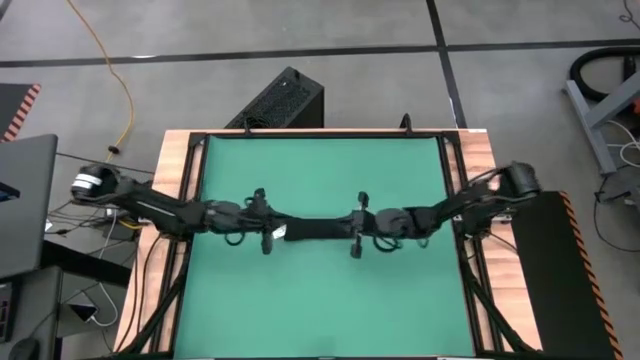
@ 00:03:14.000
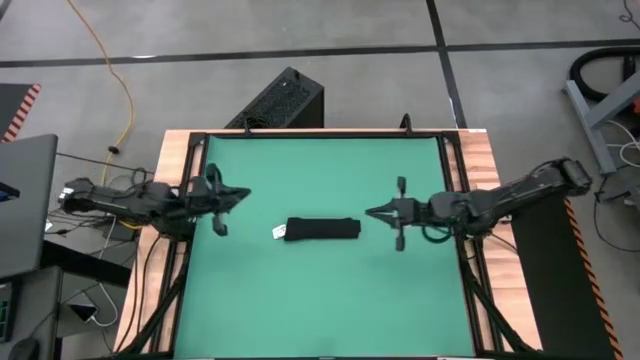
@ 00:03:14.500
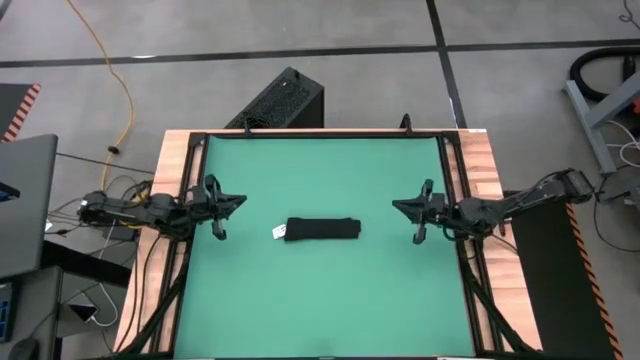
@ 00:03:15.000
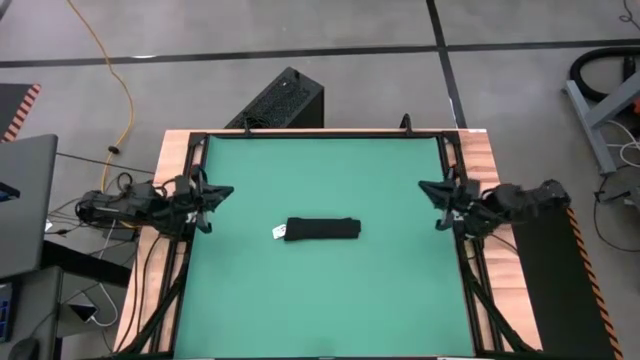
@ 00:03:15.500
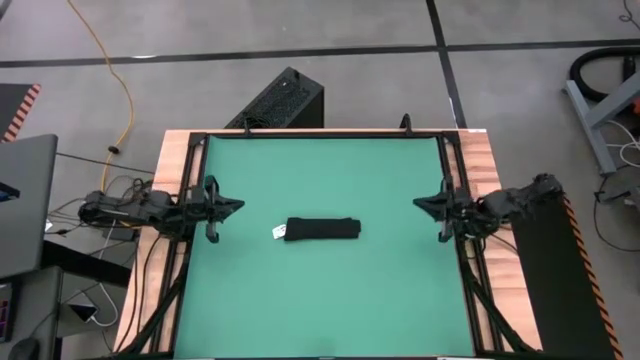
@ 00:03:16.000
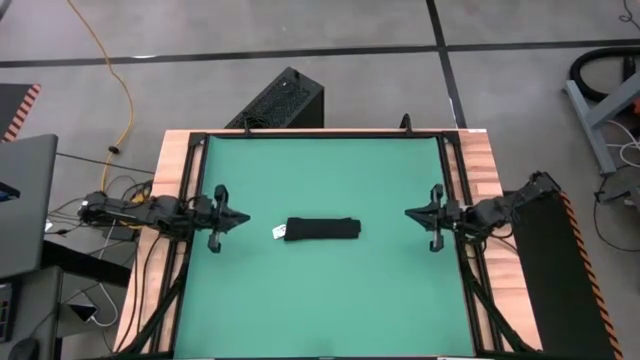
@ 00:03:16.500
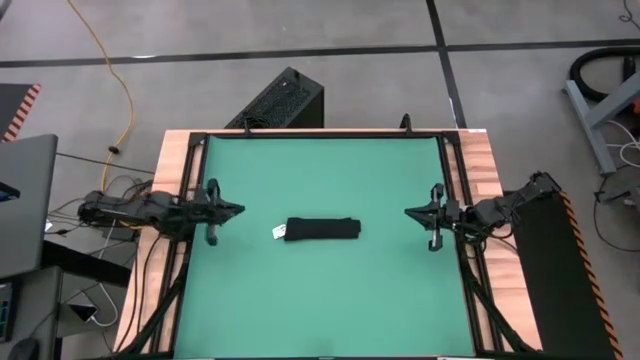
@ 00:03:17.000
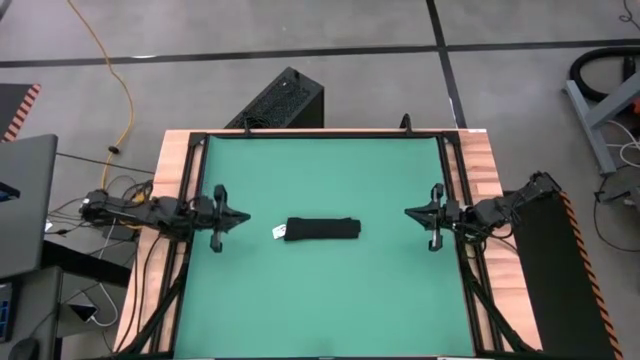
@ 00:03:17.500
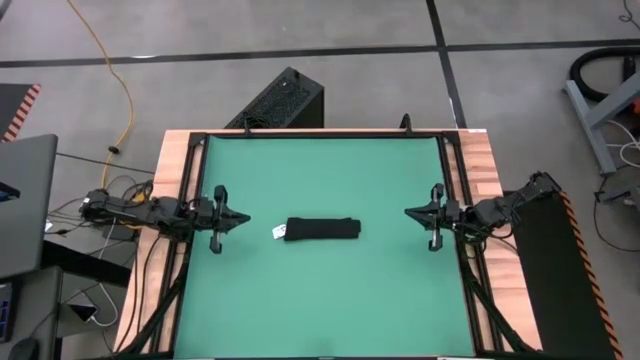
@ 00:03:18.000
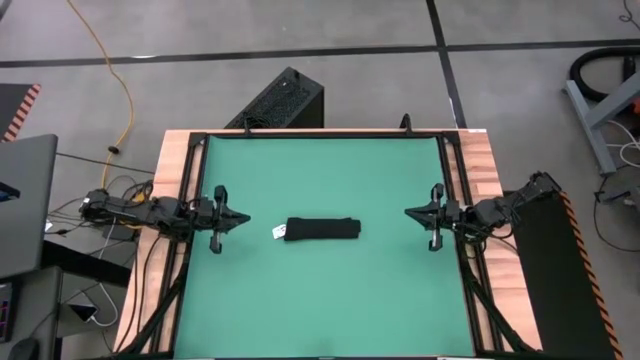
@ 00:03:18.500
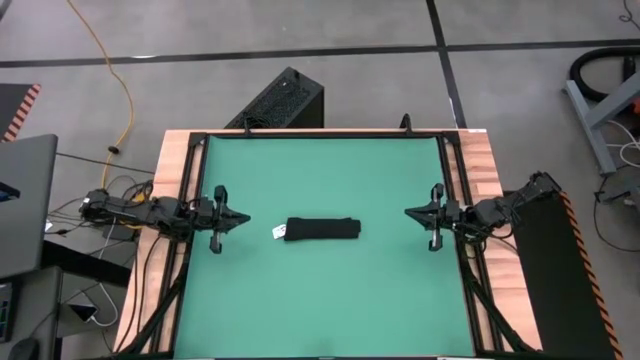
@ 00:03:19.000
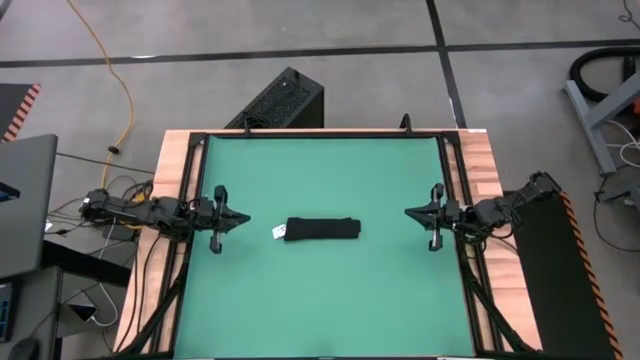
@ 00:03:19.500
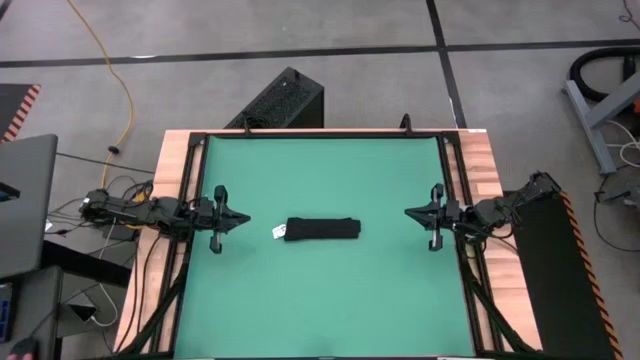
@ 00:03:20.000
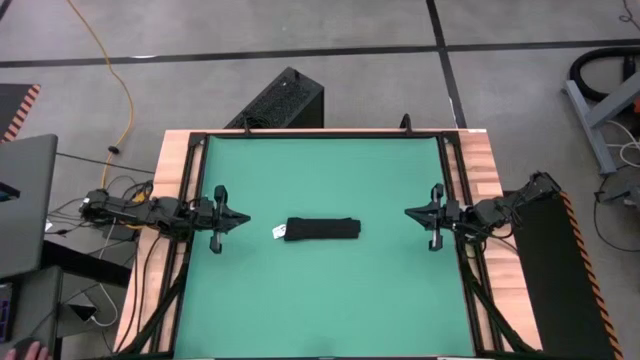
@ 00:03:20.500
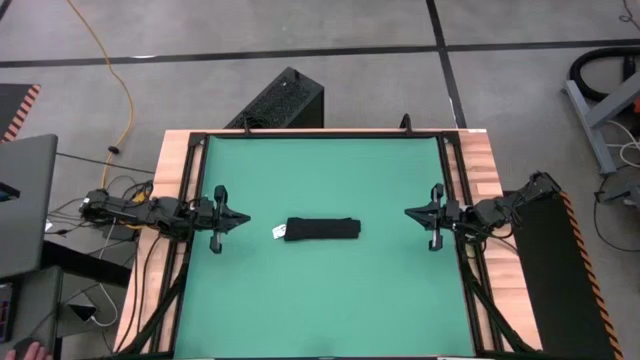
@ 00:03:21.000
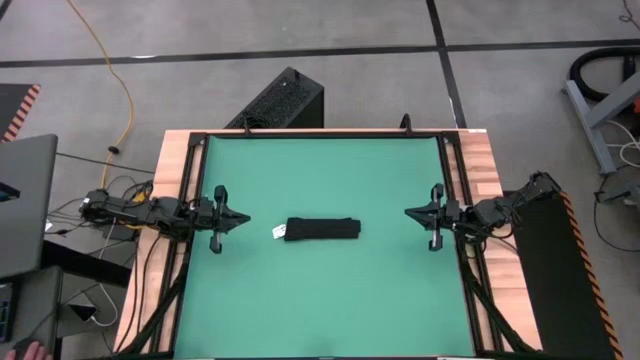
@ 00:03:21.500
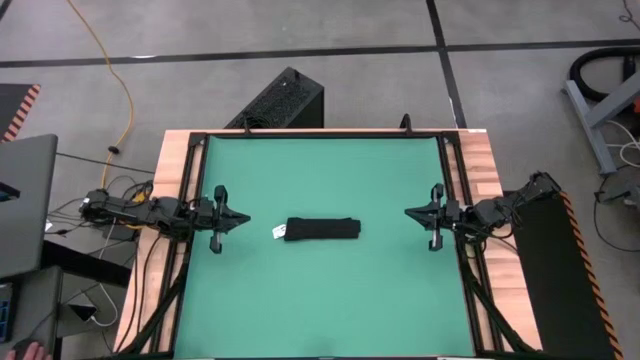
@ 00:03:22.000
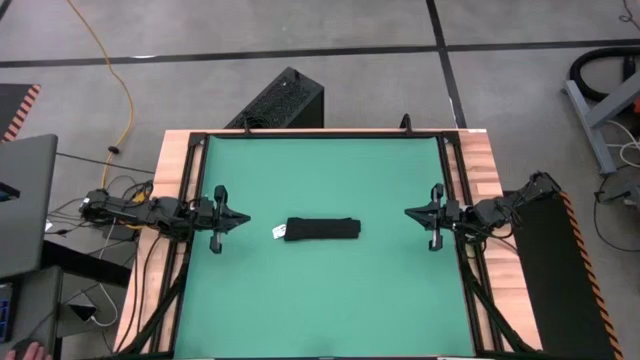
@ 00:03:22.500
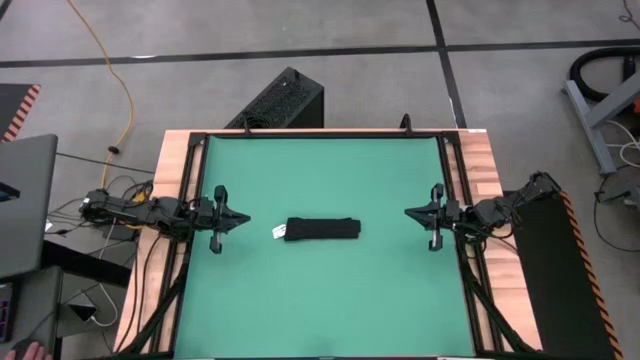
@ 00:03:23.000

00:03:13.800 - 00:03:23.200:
Task: Roll towel into tight, uniform cylinder
Return to Home Position

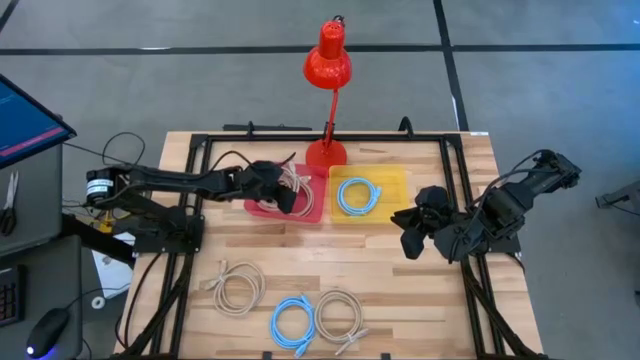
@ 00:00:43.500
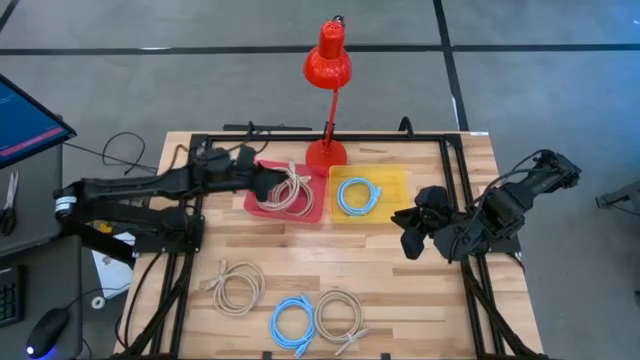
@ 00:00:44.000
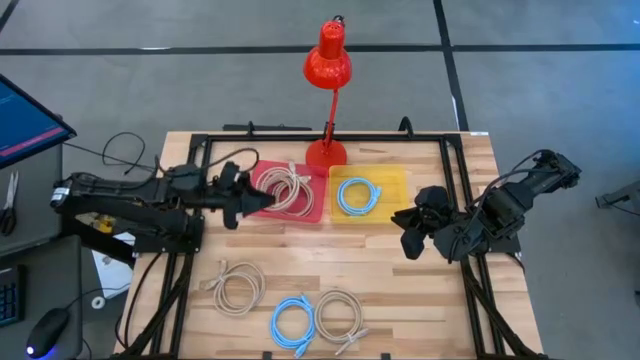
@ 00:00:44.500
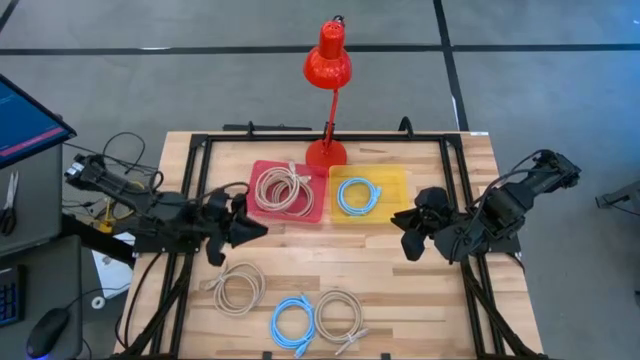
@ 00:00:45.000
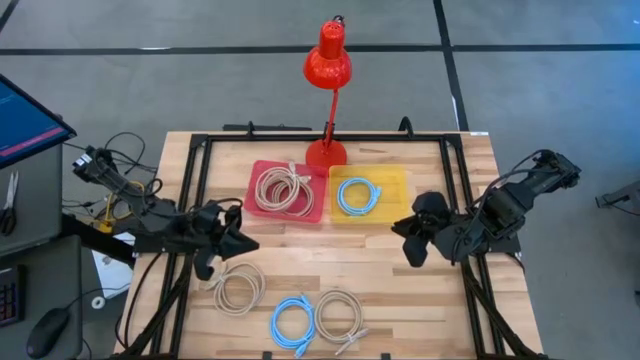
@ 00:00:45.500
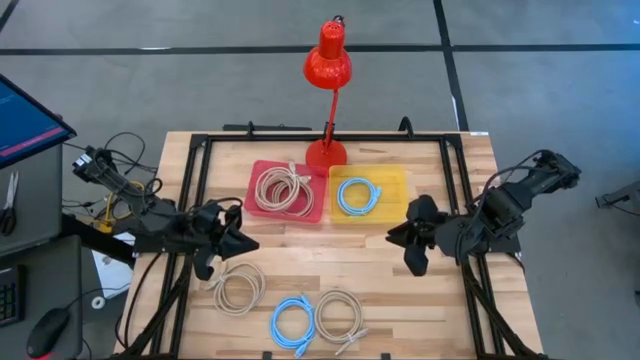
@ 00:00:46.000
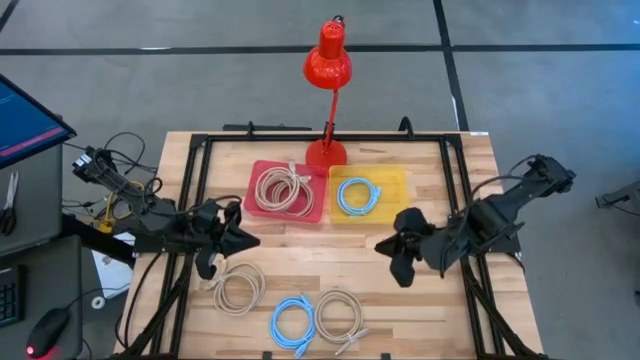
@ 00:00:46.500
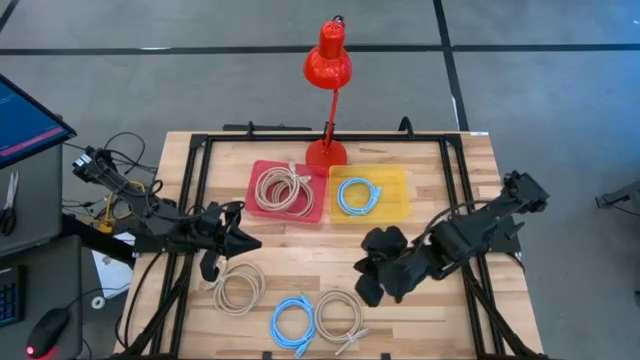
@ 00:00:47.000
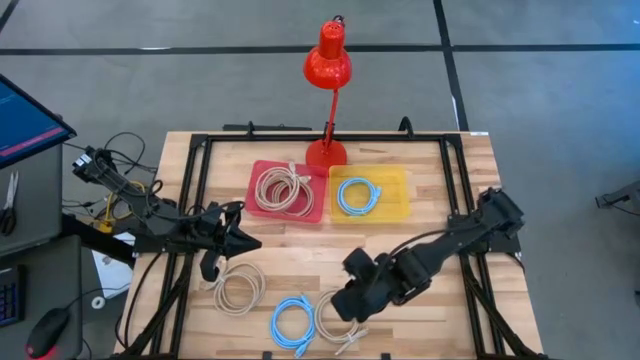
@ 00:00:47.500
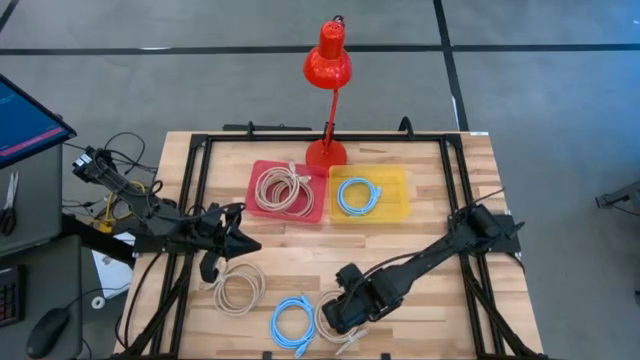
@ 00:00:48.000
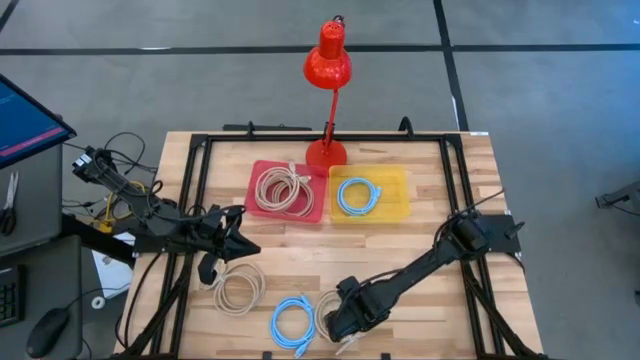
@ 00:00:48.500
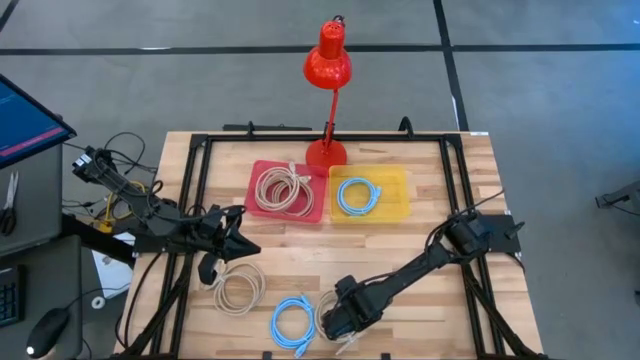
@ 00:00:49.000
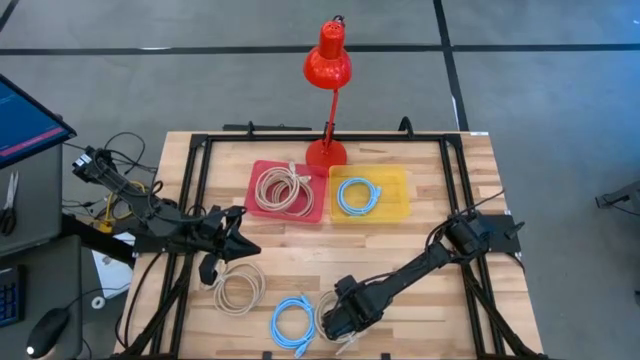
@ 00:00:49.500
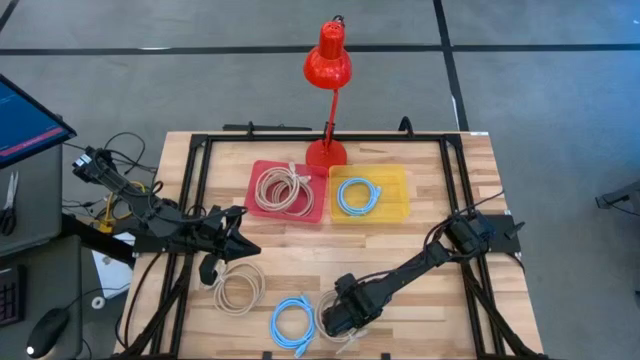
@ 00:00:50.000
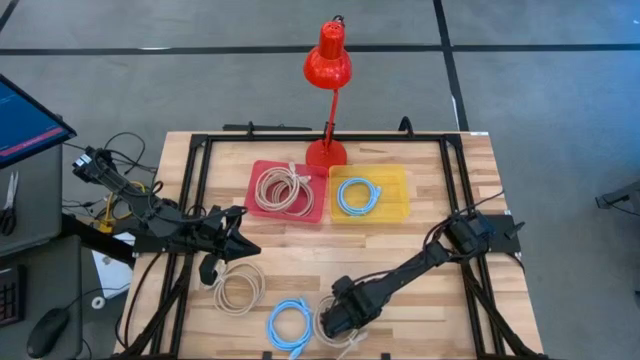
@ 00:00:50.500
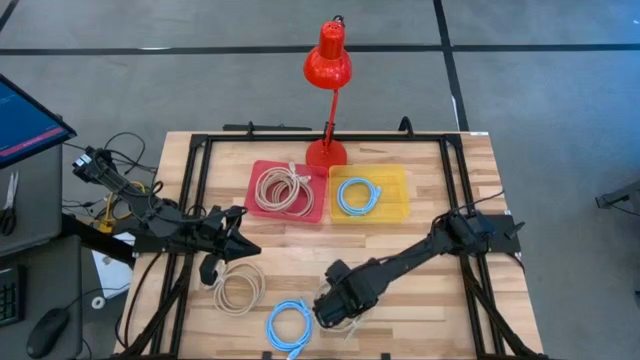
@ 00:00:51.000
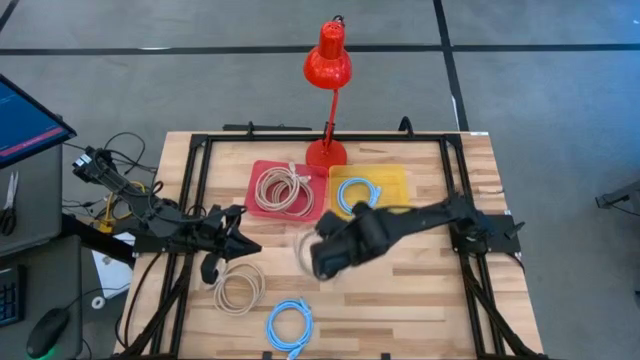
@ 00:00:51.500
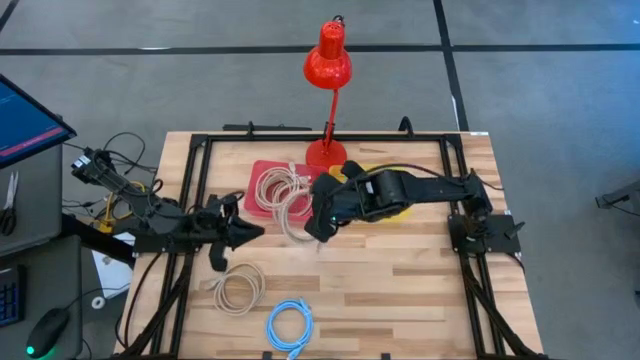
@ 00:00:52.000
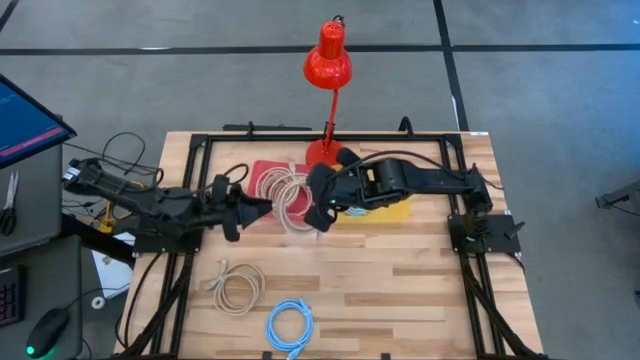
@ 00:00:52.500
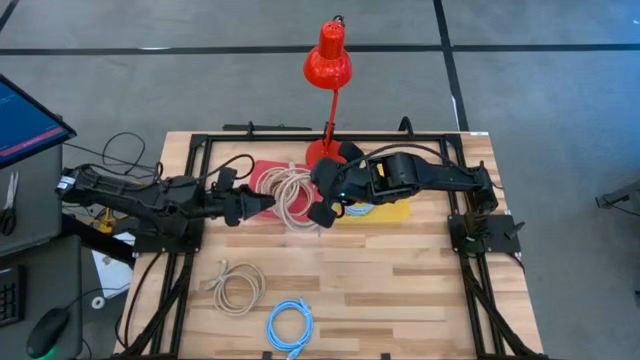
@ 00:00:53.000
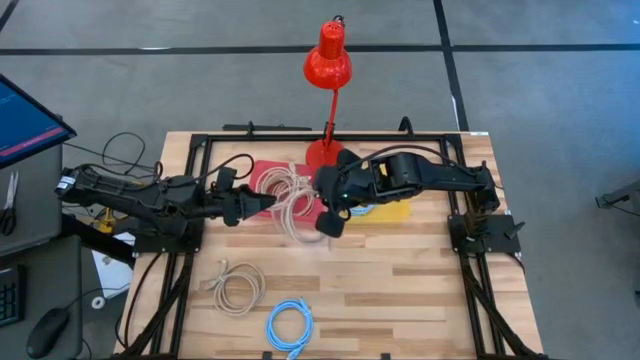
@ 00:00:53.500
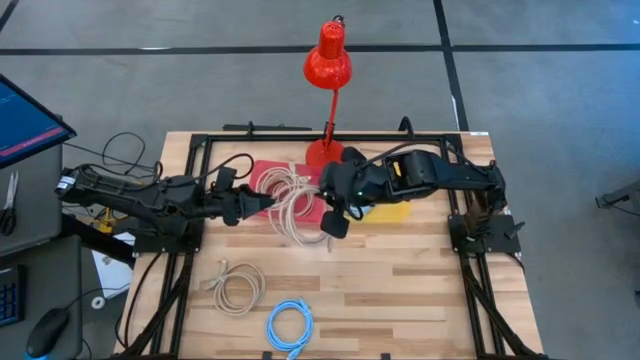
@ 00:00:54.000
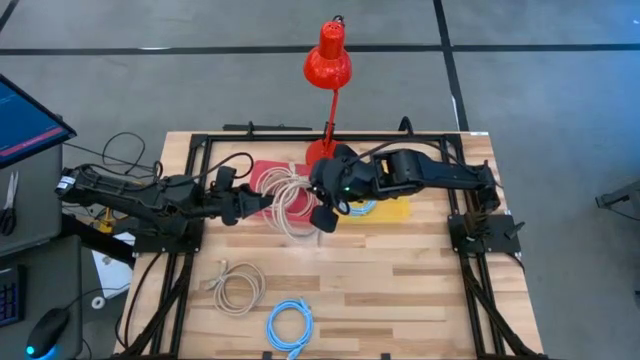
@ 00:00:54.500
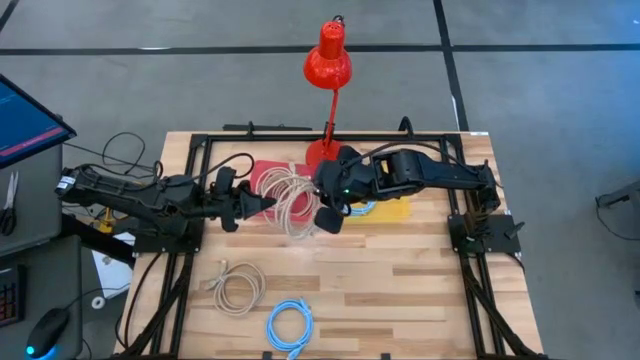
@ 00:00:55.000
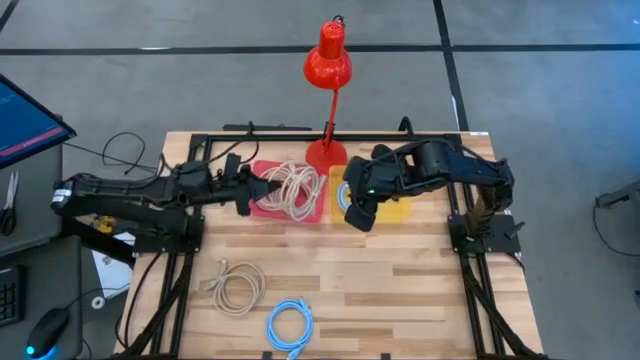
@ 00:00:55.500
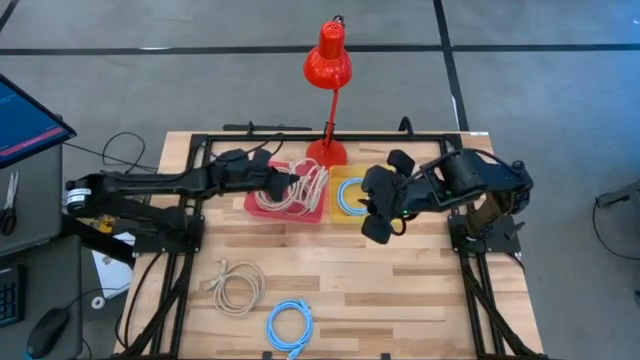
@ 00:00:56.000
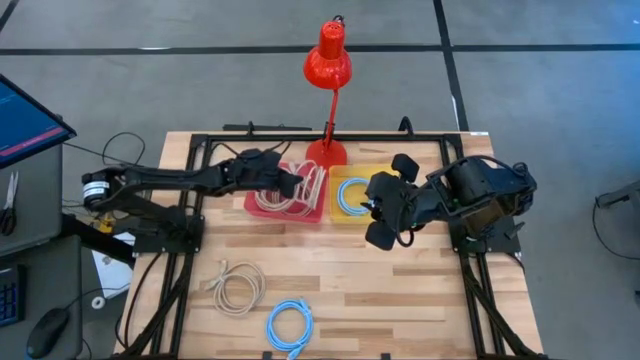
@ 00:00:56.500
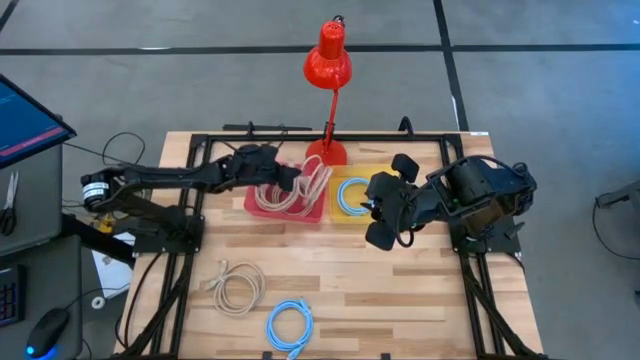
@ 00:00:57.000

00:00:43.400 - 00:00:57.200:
Task: Sort HDMI cables
Put the brown HDMI cable into the red bin
